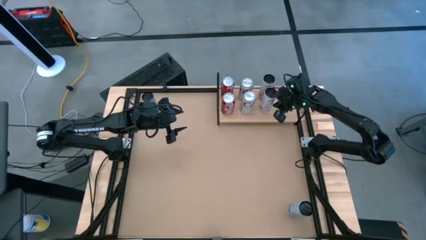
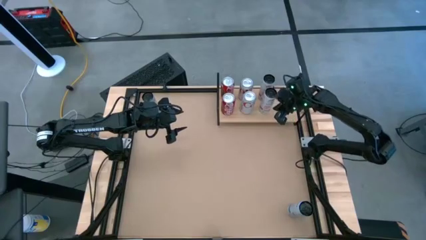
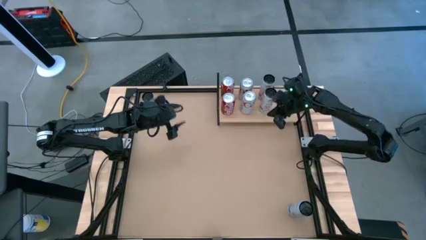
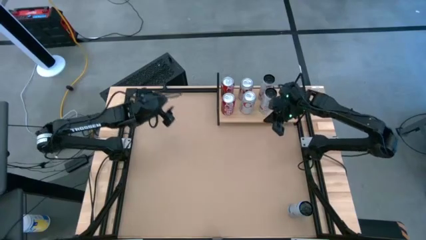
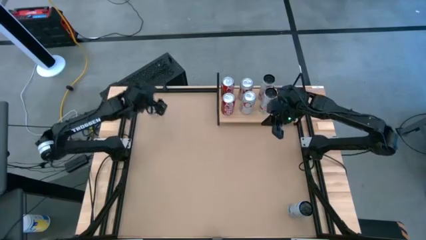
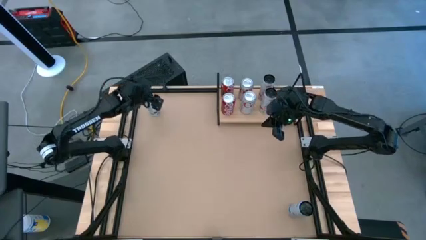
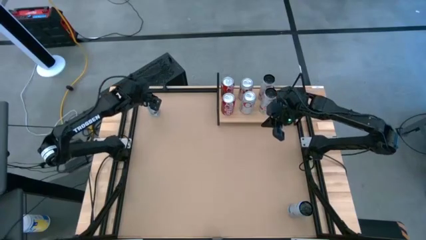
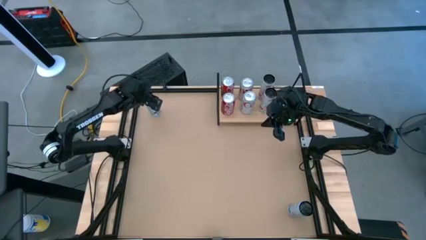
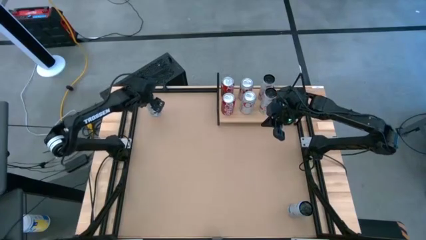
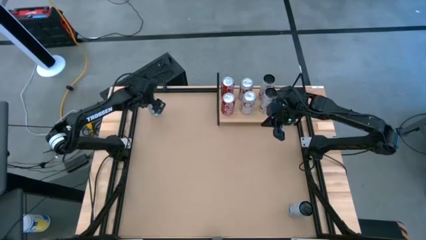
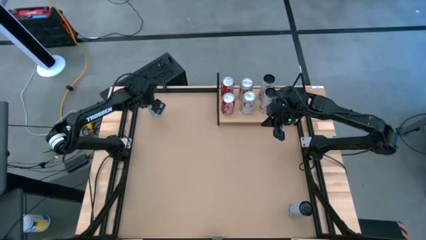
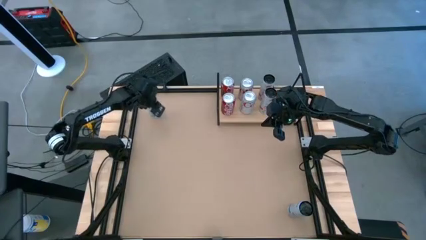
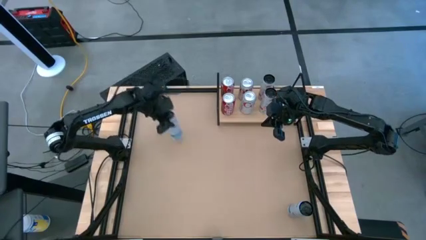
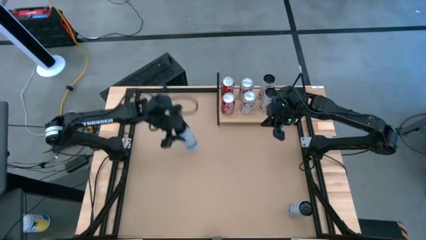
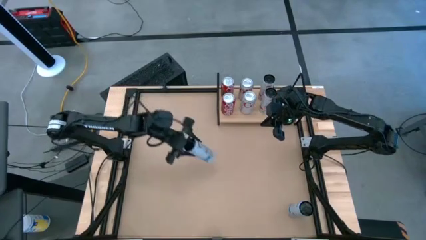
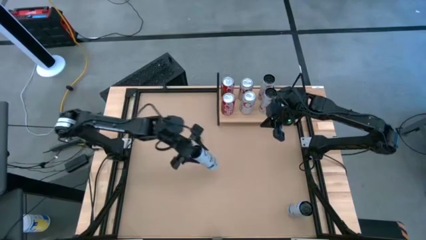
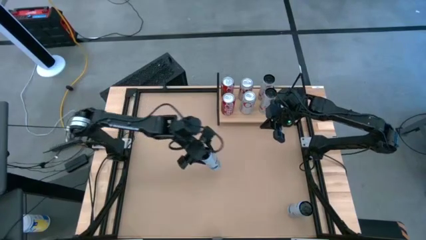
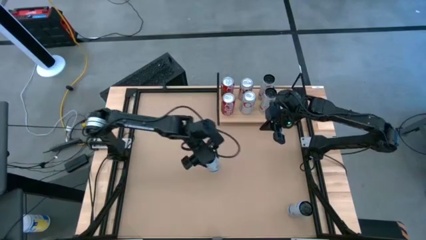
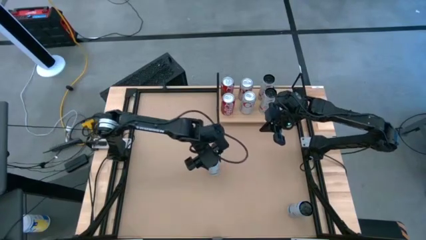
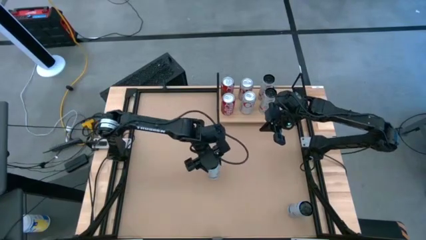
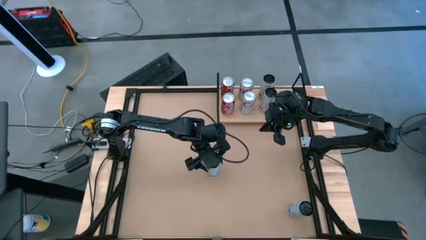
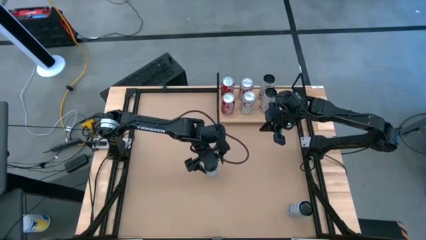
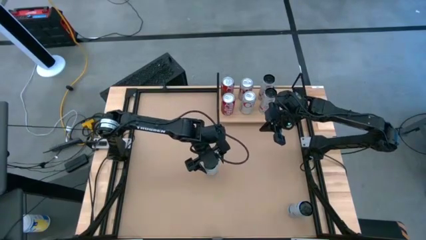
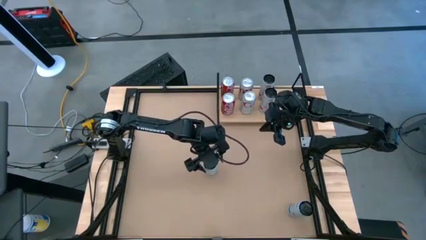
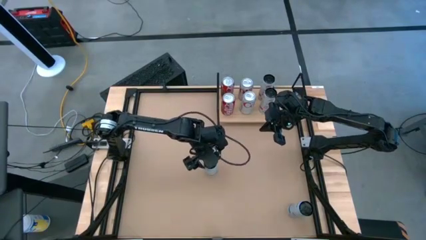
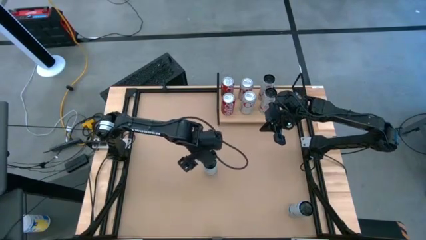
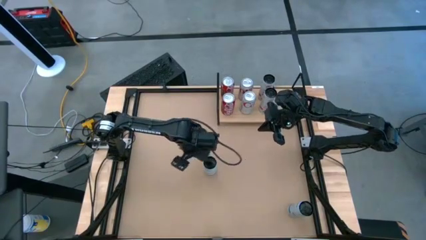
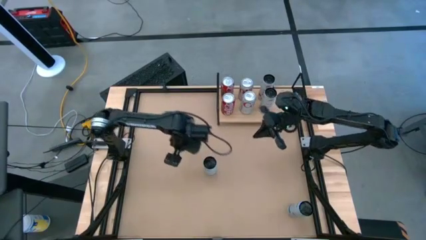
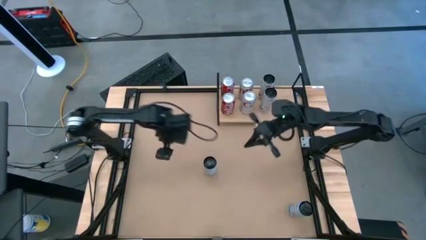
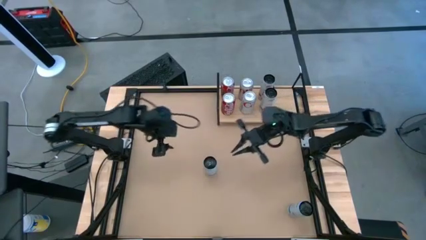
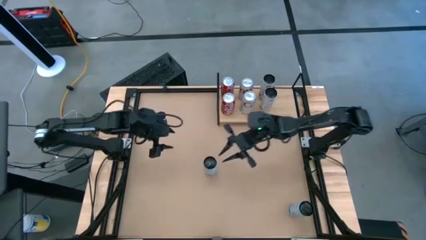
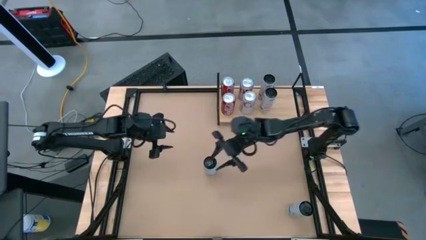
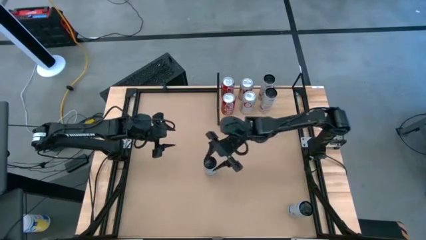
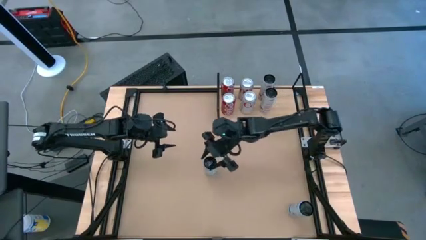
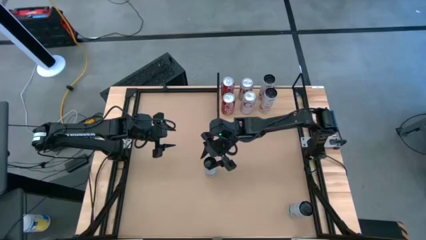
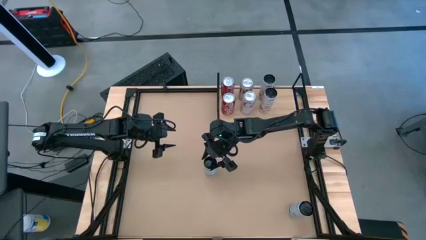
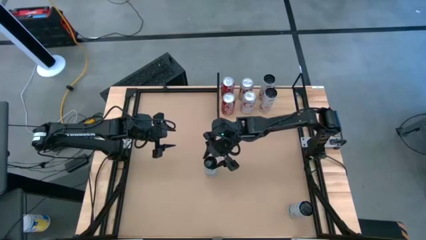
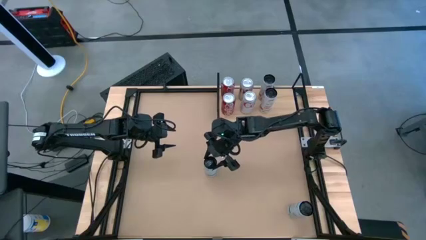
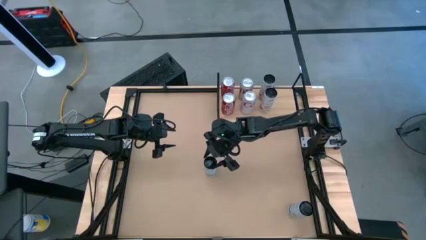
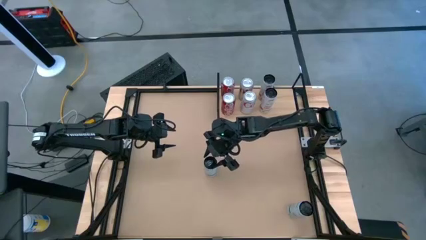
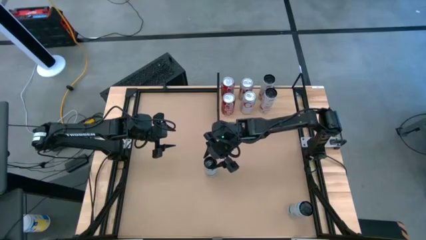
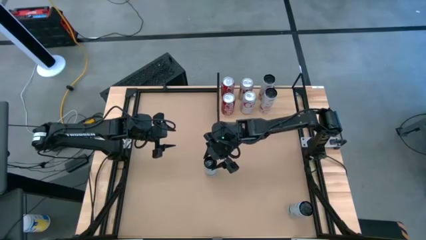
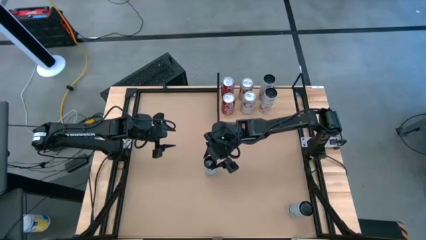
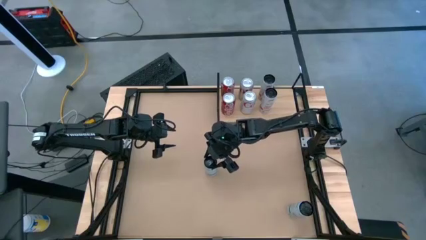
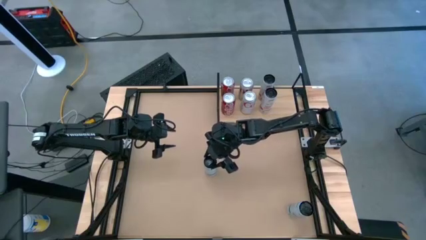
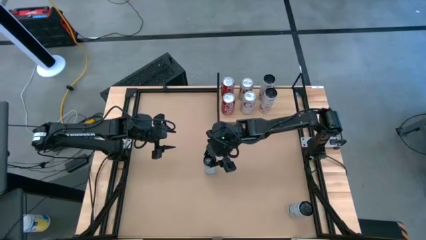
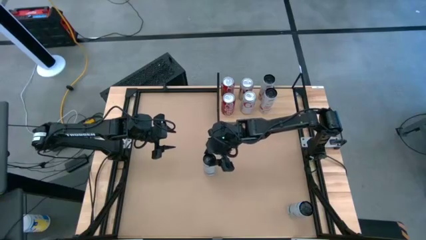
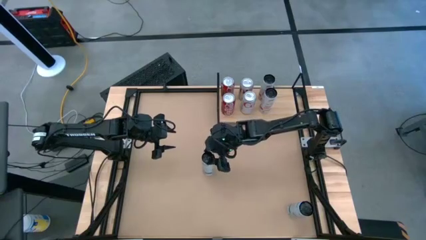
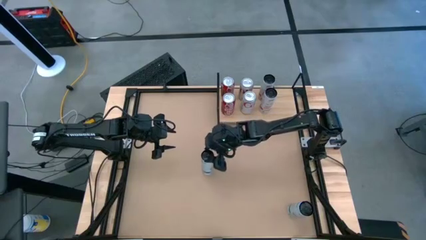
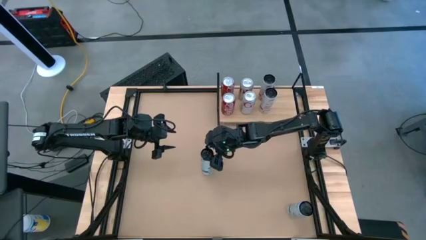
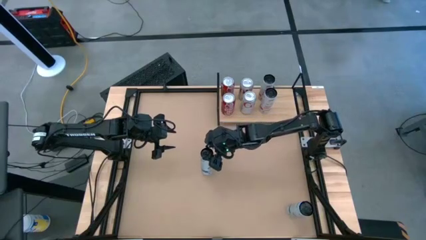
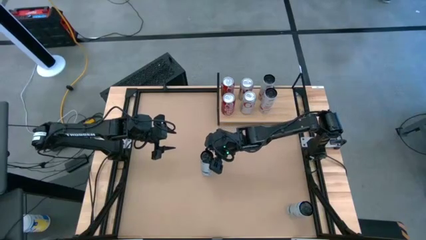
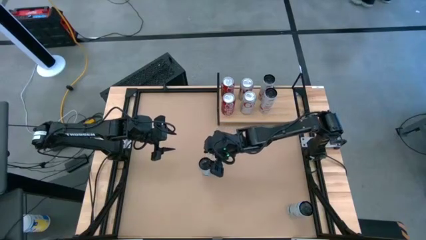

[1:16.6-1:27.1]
Task: Place canned beverage on shelf
Put the left blue white soda can on the shelf
